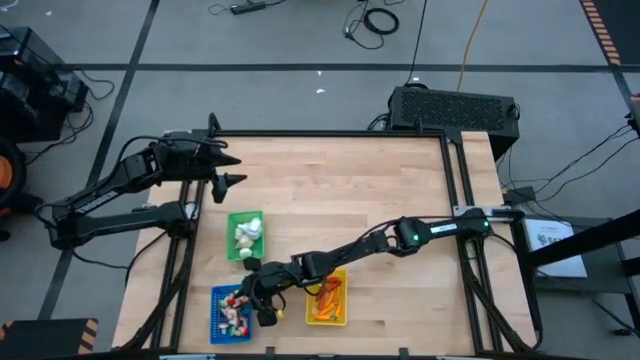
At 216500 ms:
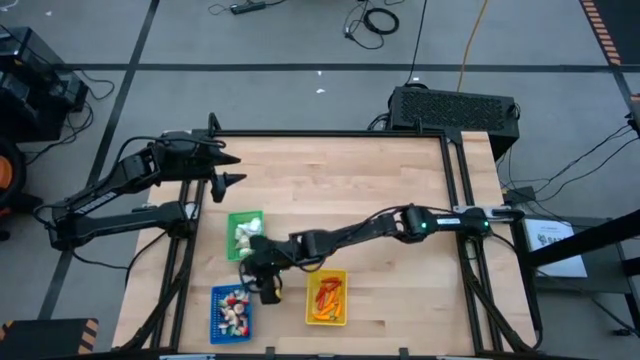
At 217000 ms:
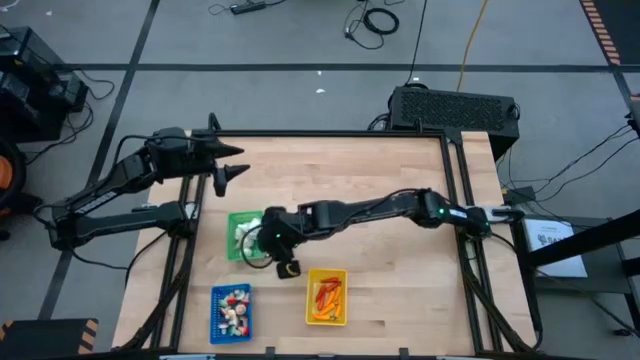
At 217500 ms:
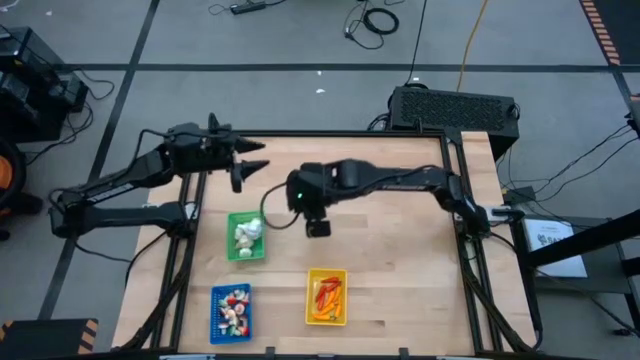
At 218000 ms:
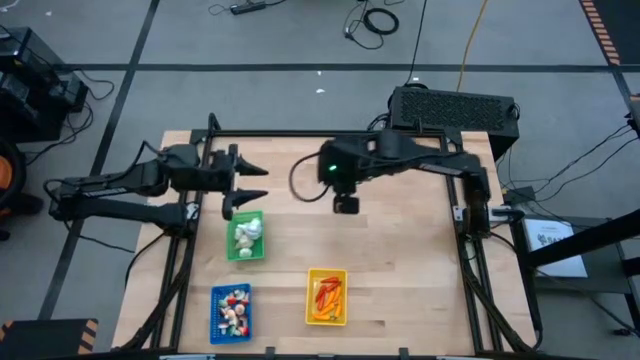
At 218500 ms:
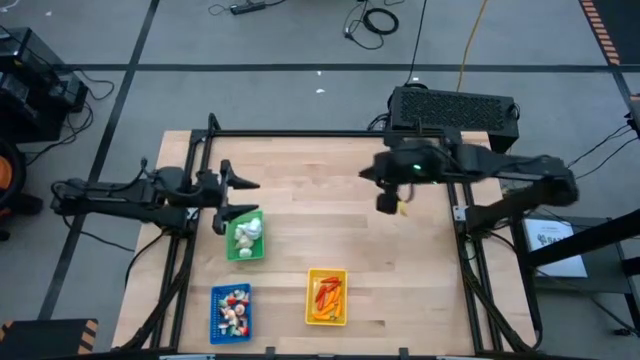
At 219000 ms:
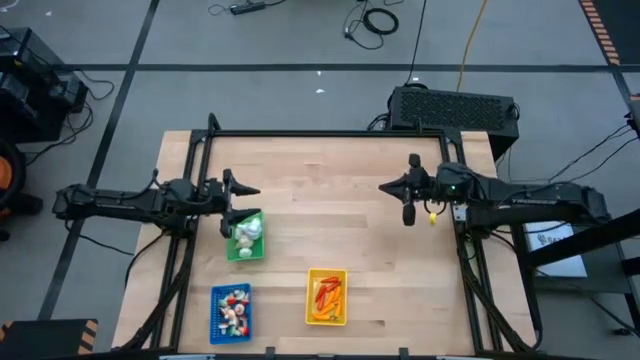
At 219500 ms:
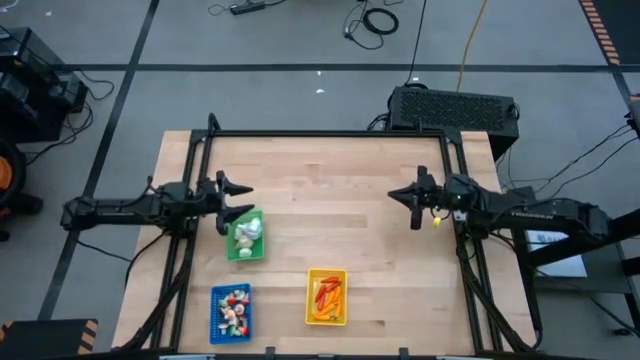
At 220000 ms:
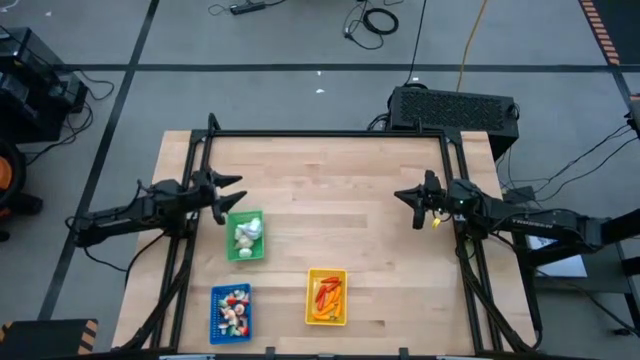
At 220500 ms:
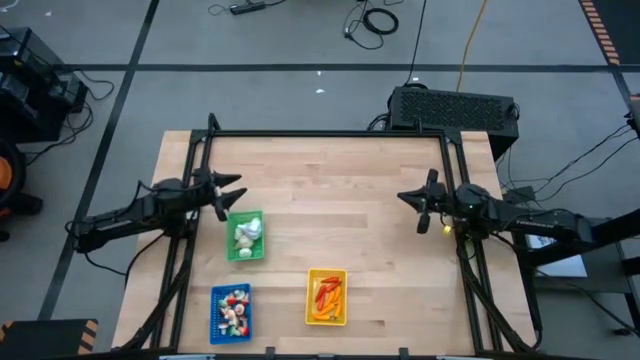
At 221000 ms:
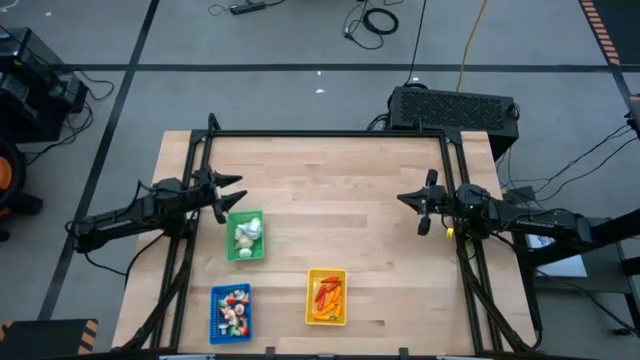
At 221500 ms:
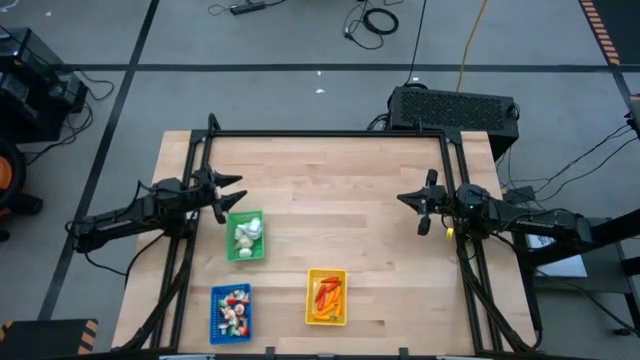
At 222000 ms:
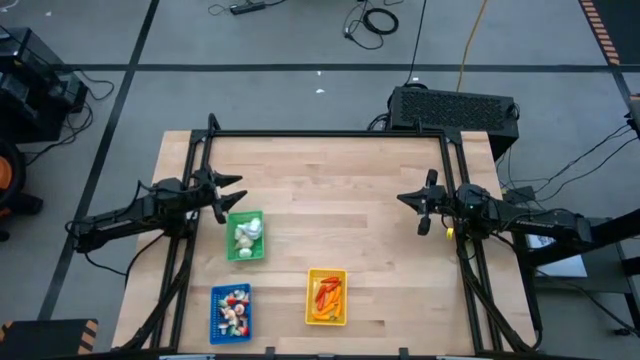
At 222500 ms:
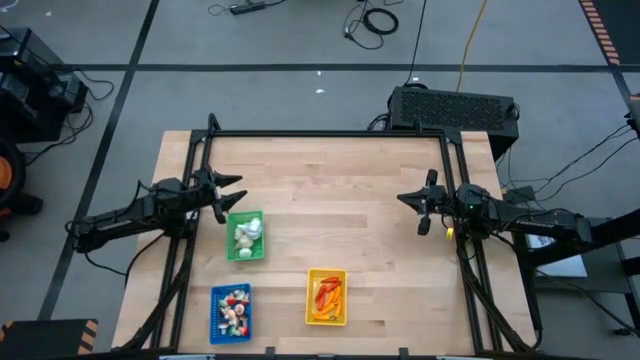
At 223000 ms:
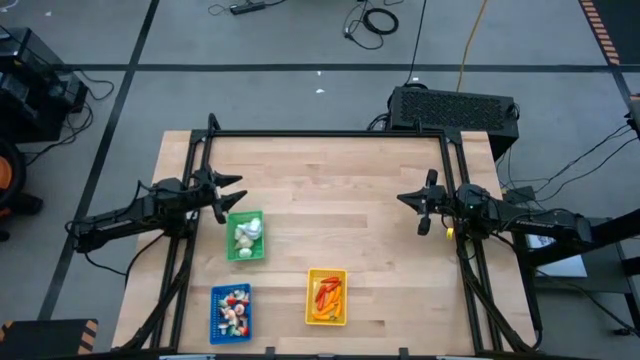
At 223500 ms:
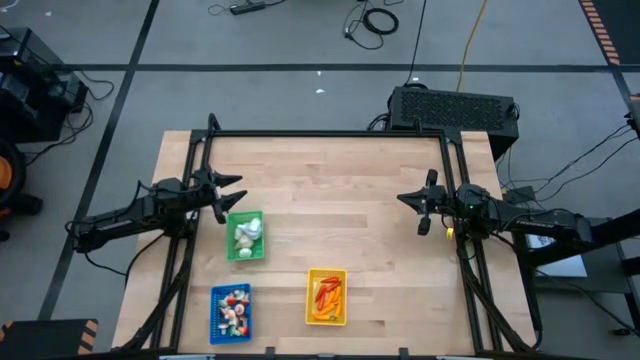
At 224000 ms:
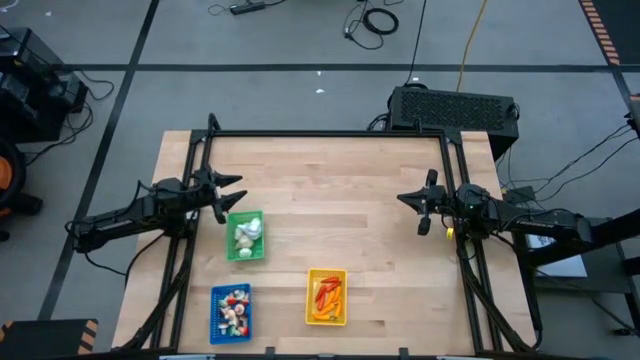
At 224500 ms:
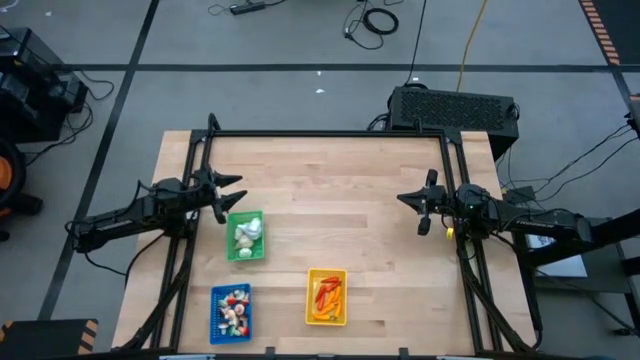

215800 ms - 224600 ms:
Task: Sort produce into baskets
Return to Home Position

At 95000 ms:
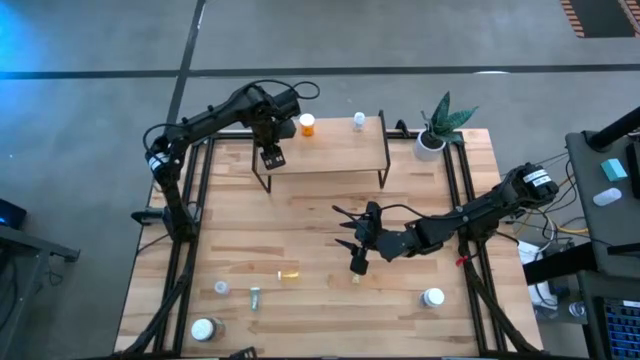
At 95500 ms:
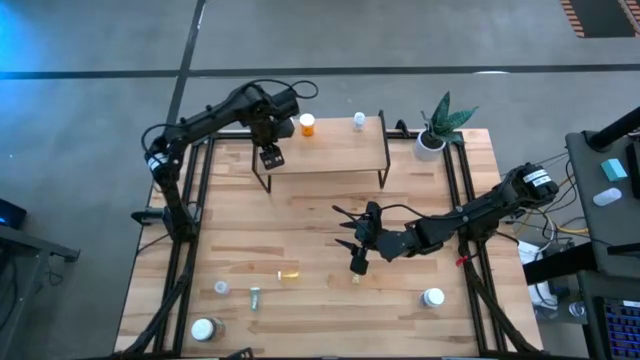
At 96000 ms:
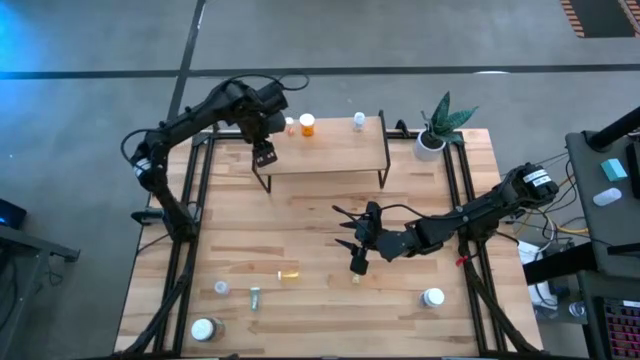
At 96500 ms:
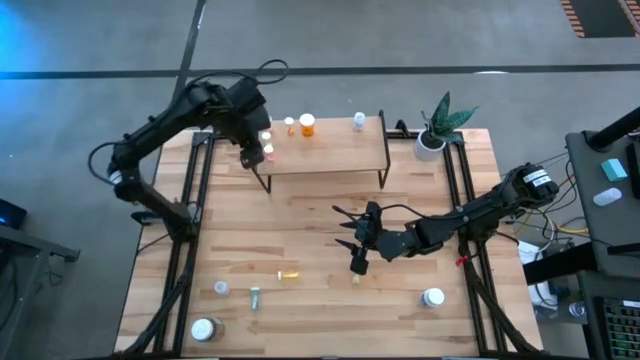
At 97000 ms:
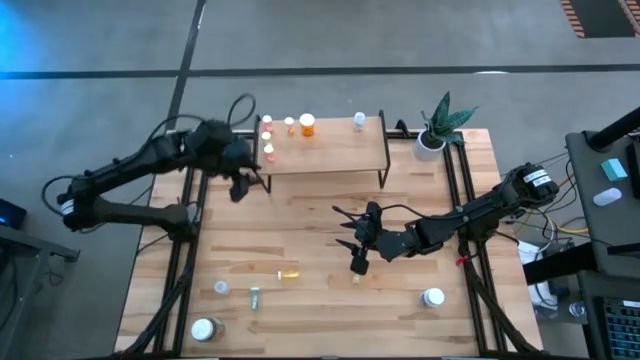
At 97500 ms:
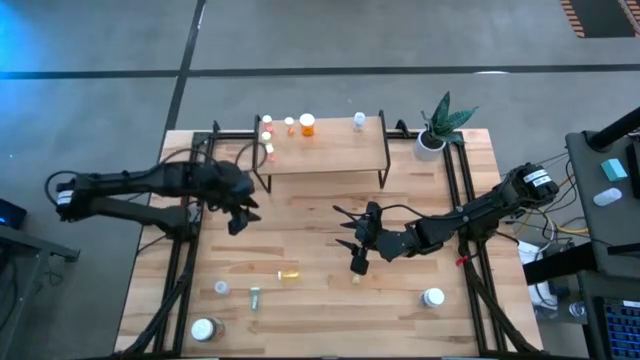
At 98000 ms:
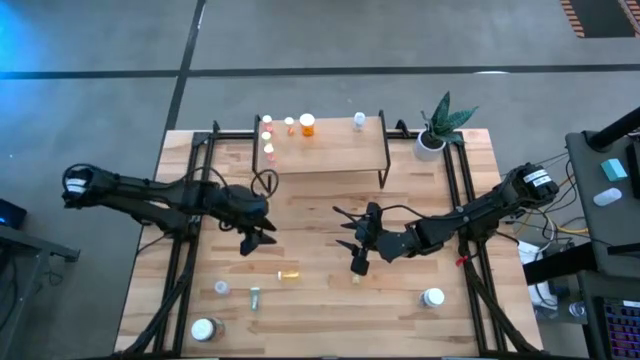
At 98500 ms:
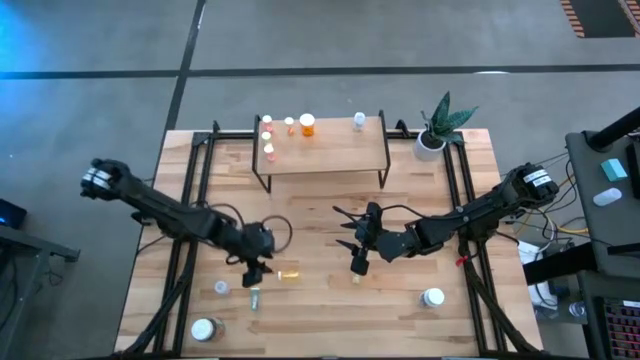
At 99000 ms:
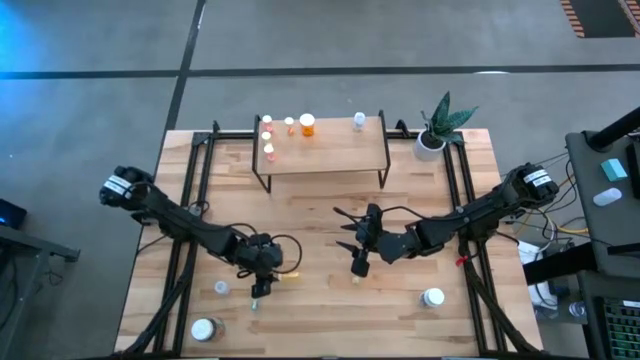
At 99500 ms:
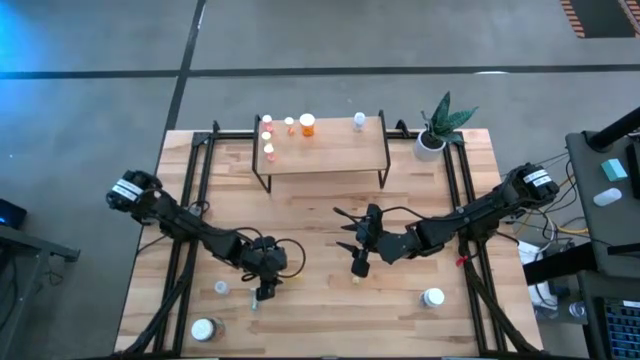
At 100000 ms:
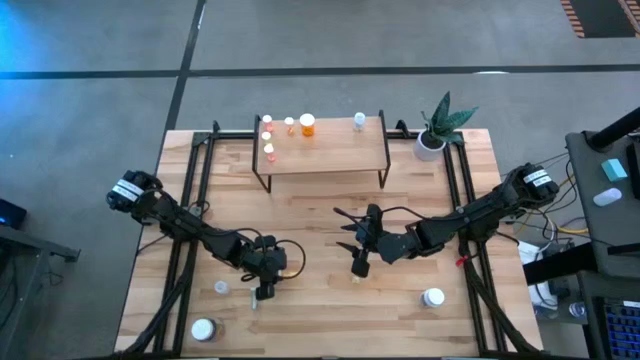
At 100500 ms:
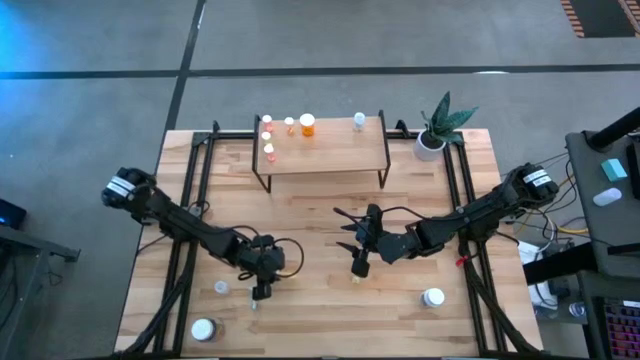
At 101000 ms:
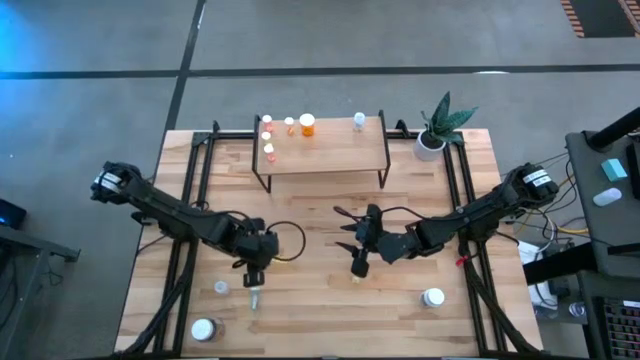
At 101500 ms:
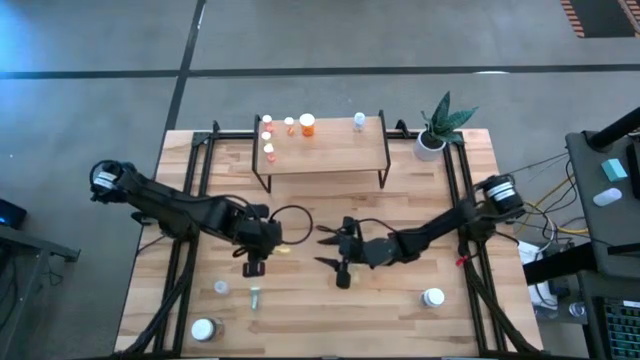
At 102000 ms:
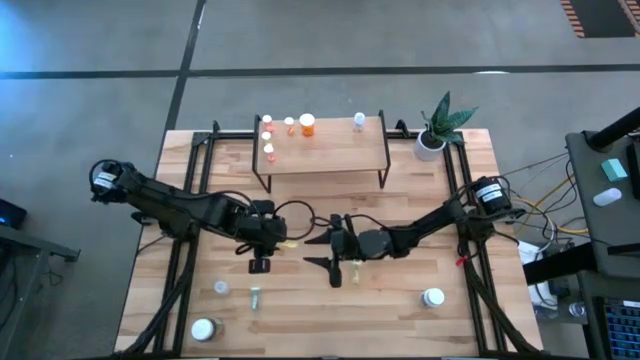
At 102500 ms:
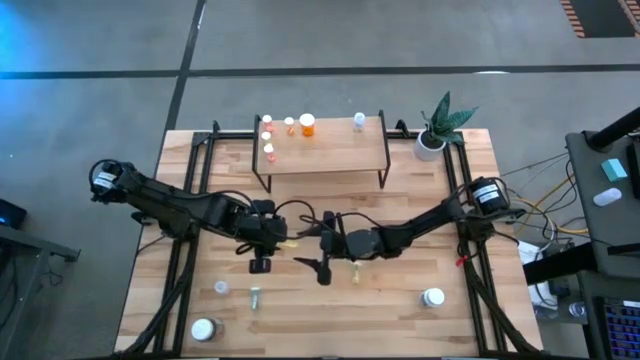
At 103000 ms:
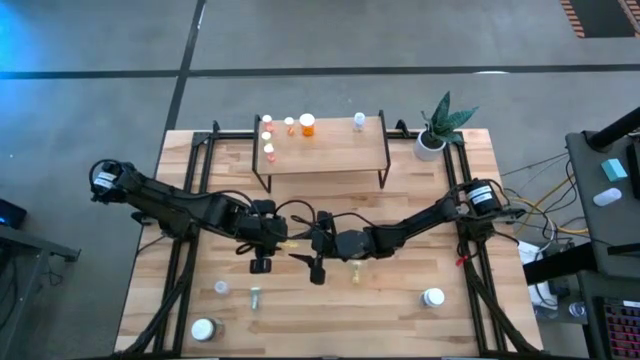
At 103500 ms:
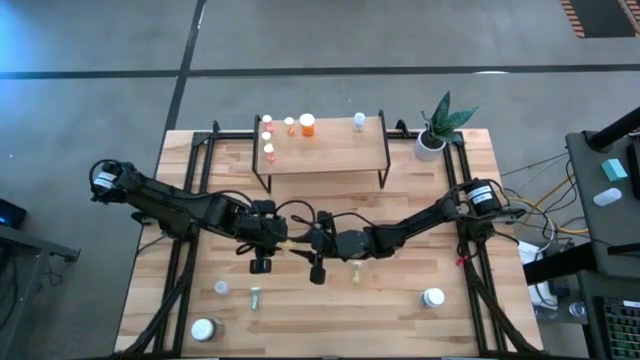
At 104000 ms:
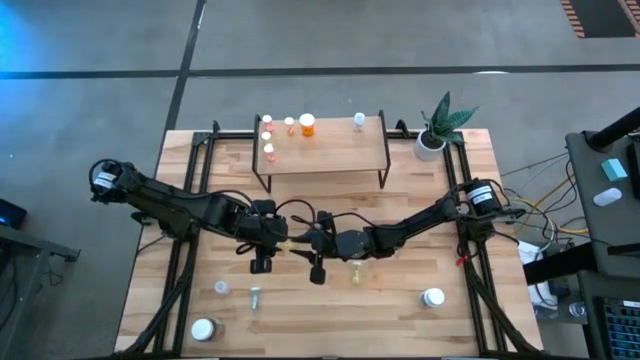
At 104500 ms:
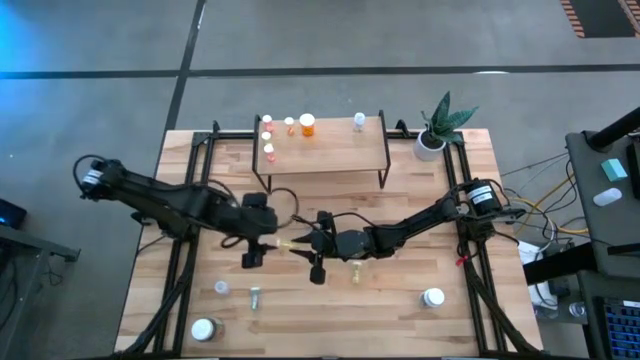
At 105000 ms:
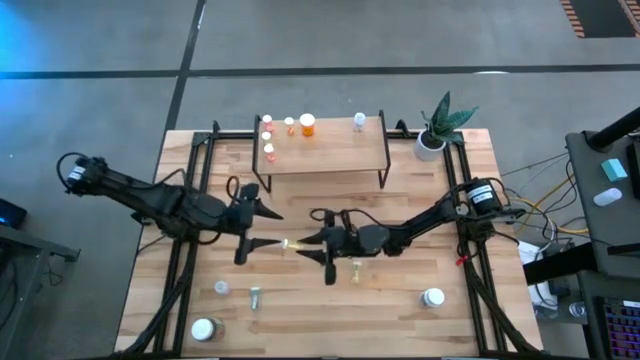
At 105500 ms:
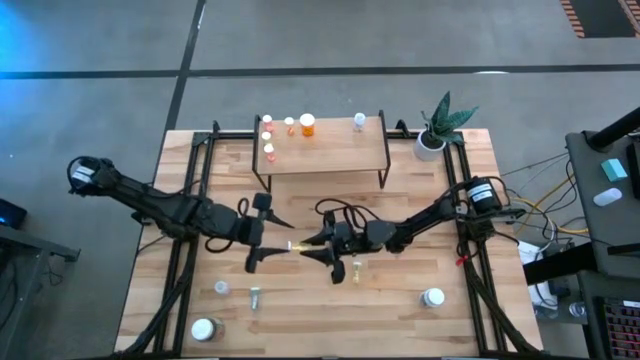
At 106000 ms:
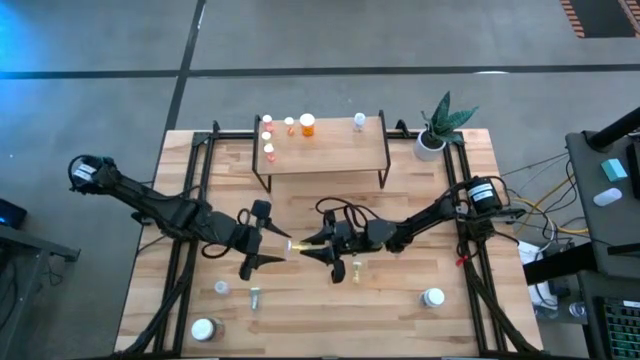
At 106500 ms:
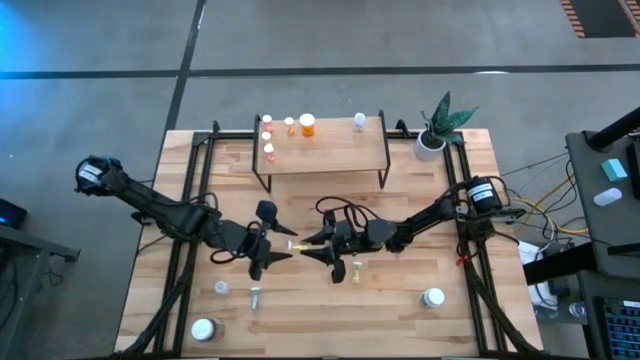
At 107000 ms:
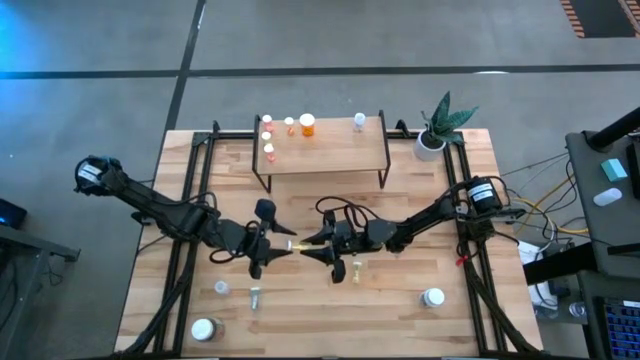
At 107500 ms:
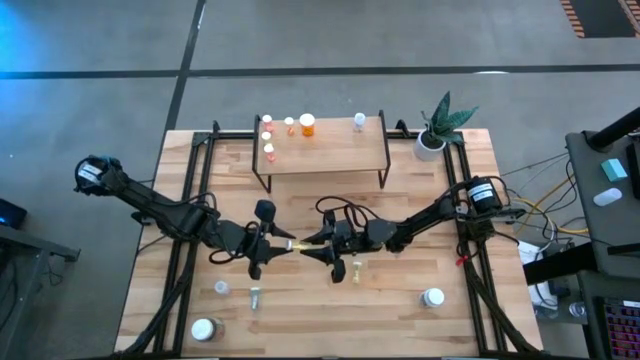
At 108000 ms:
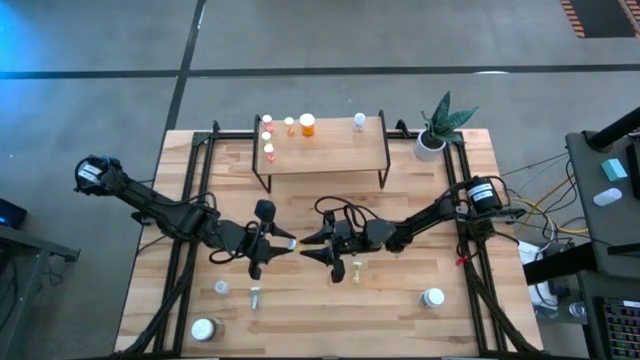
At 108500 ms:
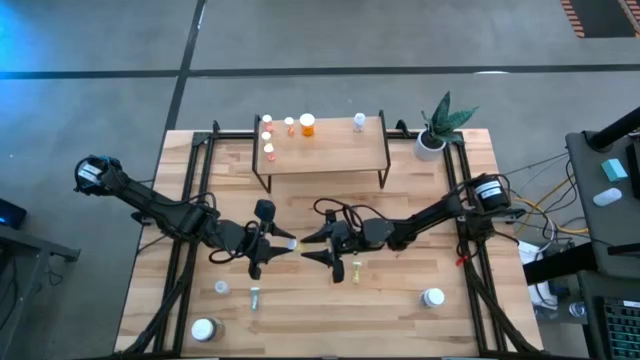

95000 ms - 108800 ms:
Task: Pick and place medicine bottles onto shelf by color
Put the left yellow pill bottle on the shelf
